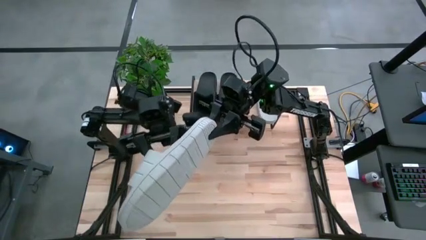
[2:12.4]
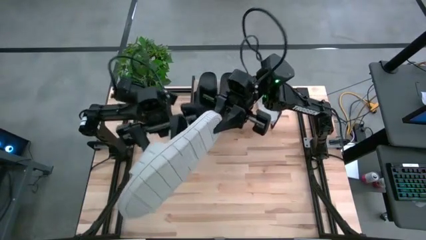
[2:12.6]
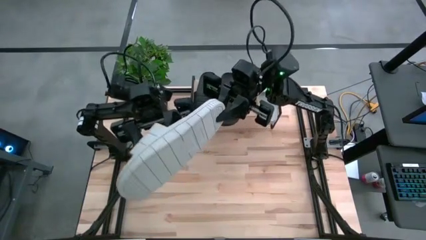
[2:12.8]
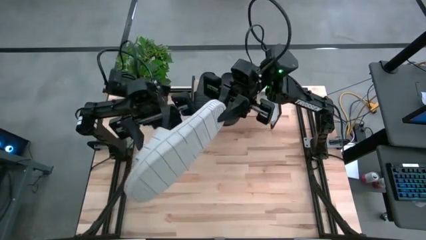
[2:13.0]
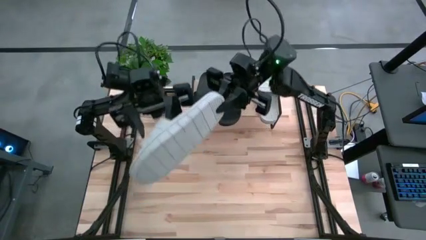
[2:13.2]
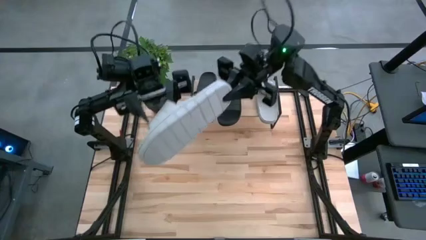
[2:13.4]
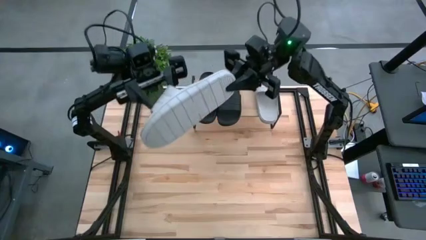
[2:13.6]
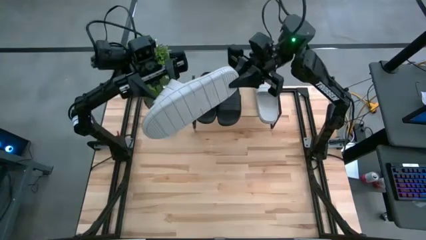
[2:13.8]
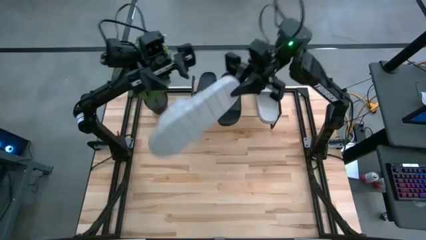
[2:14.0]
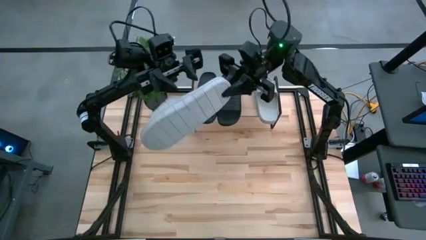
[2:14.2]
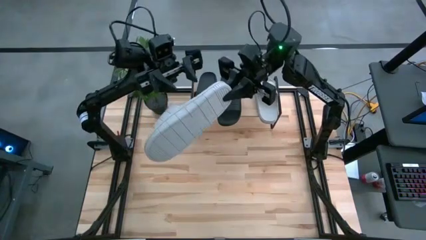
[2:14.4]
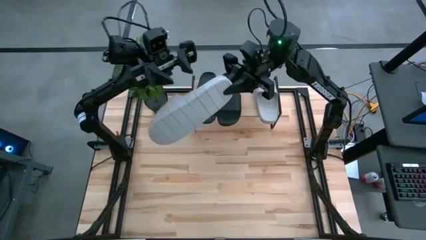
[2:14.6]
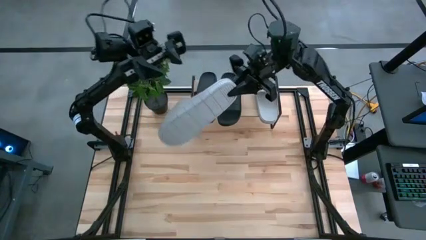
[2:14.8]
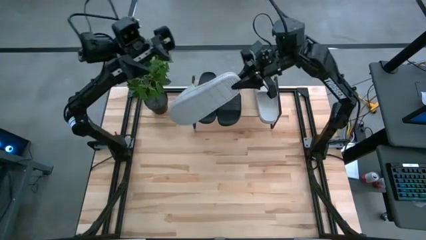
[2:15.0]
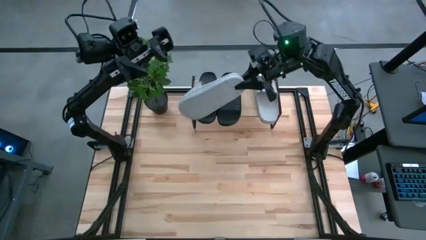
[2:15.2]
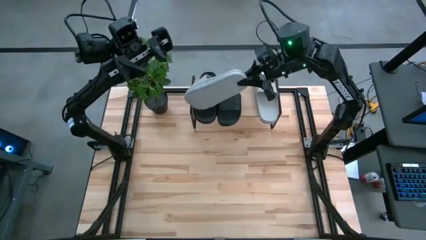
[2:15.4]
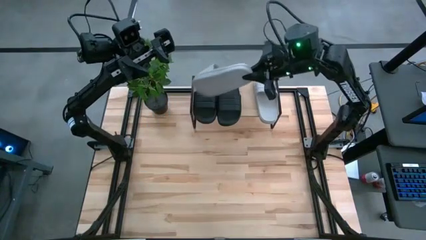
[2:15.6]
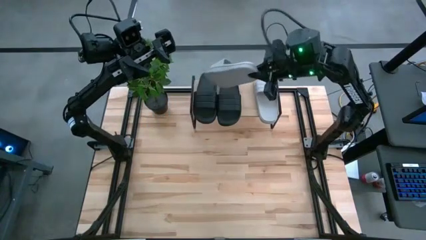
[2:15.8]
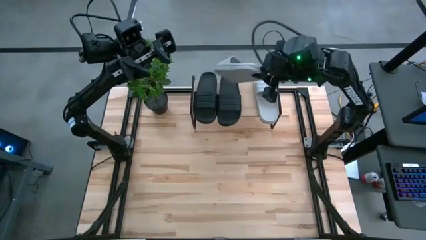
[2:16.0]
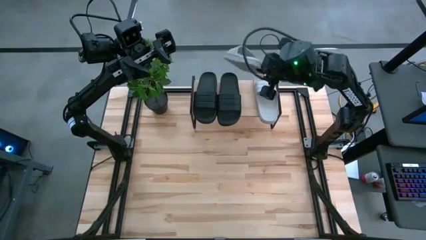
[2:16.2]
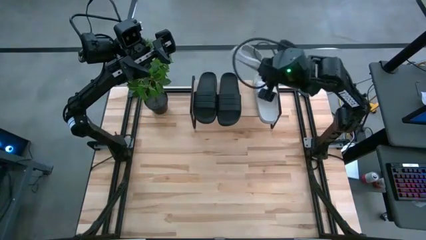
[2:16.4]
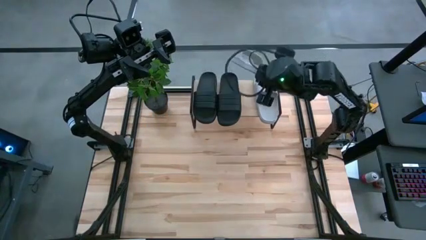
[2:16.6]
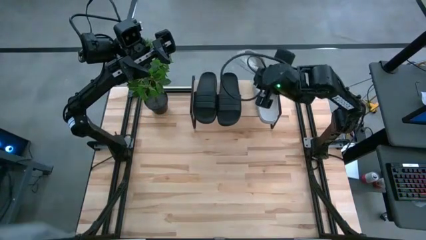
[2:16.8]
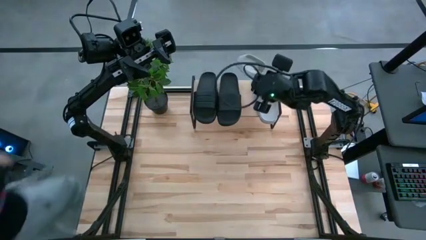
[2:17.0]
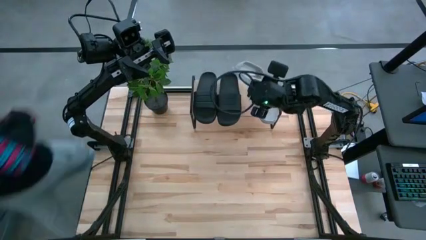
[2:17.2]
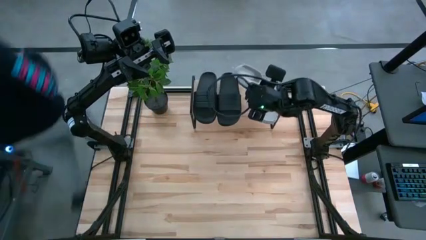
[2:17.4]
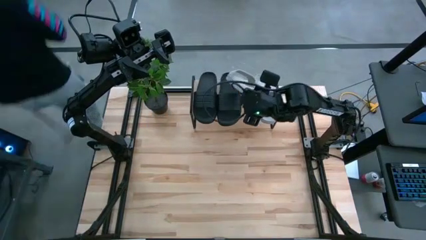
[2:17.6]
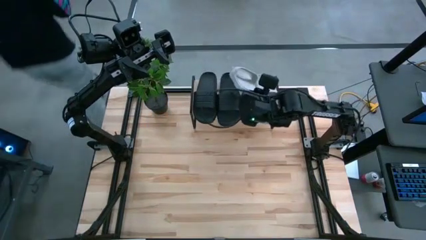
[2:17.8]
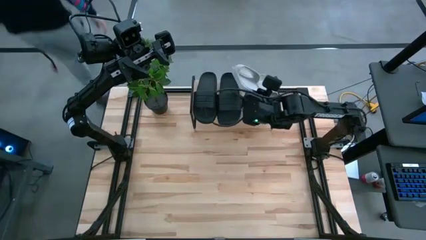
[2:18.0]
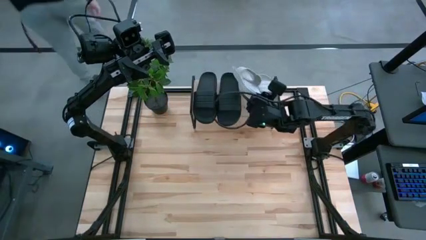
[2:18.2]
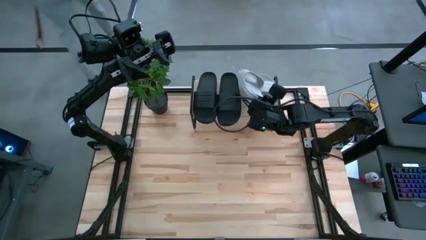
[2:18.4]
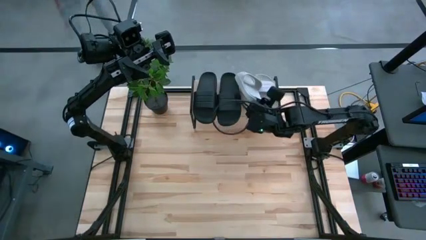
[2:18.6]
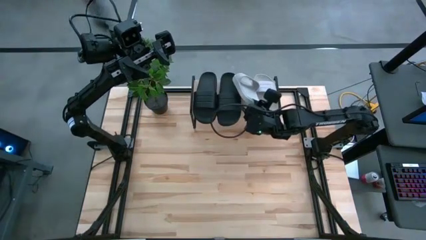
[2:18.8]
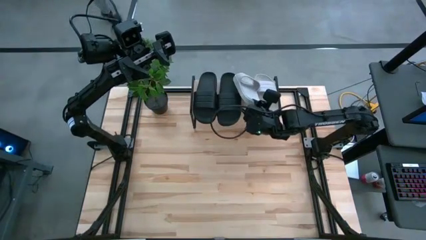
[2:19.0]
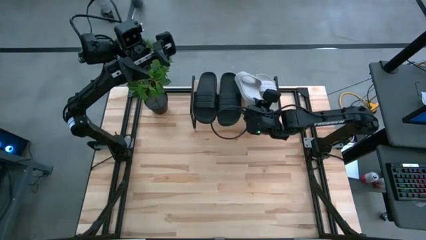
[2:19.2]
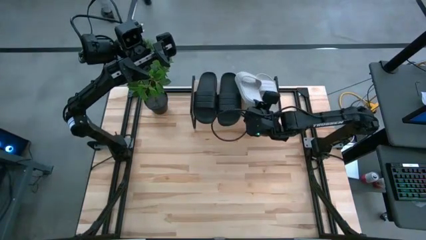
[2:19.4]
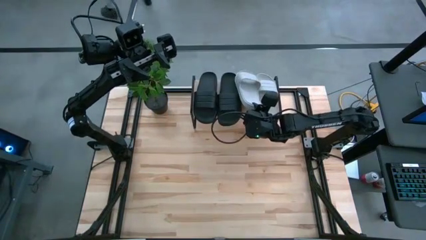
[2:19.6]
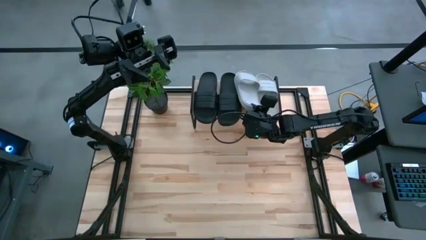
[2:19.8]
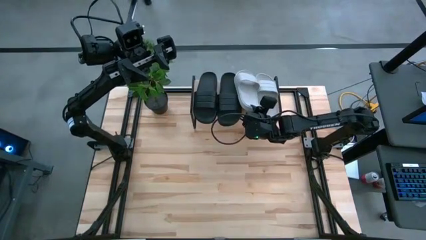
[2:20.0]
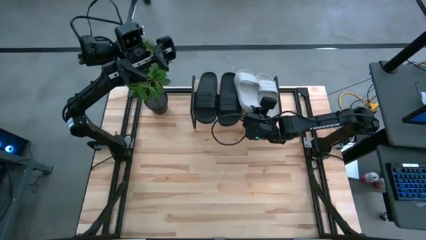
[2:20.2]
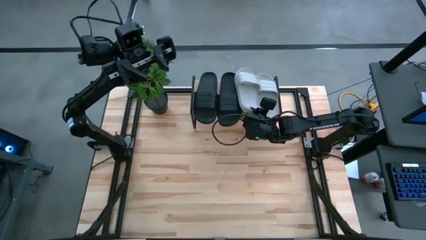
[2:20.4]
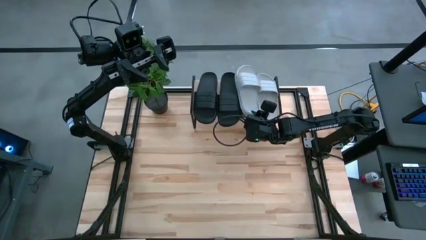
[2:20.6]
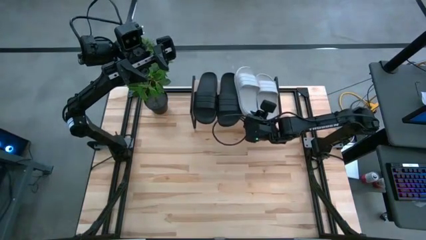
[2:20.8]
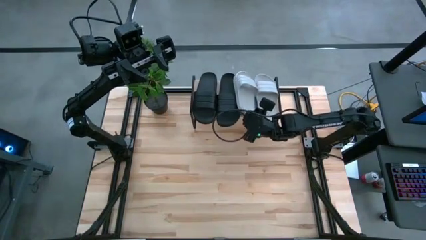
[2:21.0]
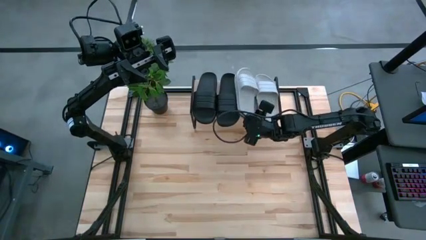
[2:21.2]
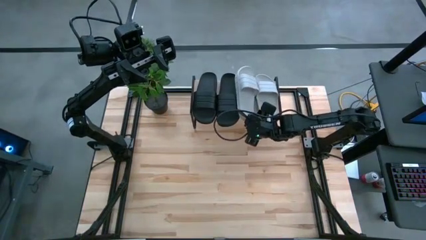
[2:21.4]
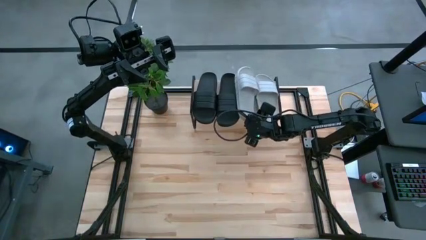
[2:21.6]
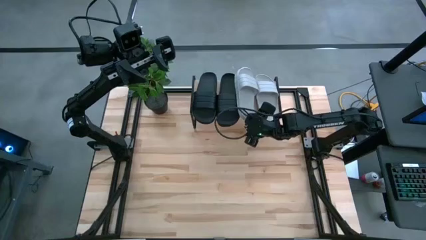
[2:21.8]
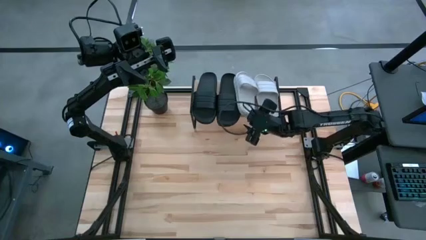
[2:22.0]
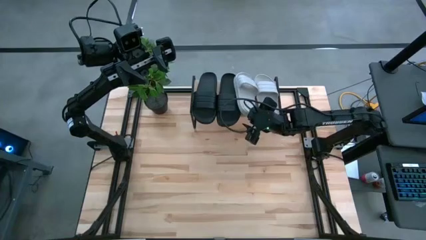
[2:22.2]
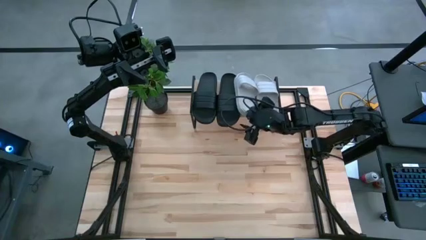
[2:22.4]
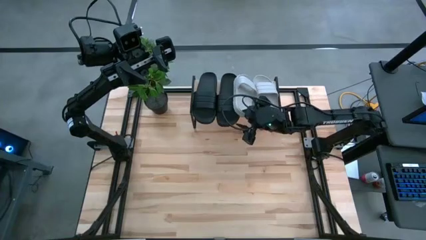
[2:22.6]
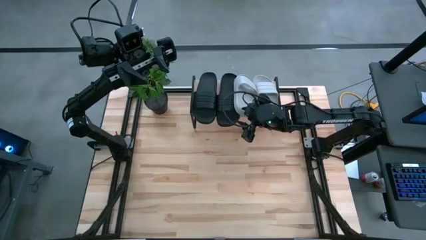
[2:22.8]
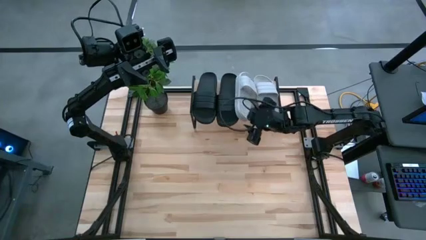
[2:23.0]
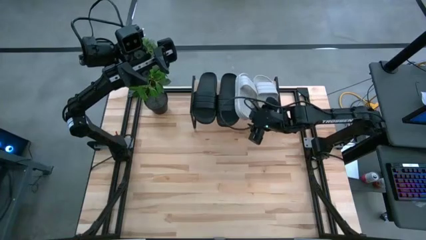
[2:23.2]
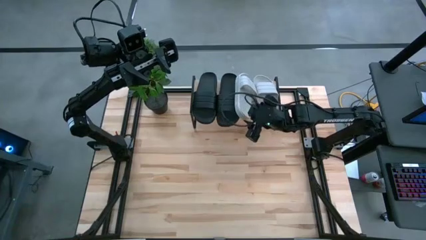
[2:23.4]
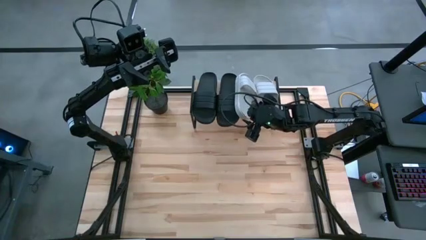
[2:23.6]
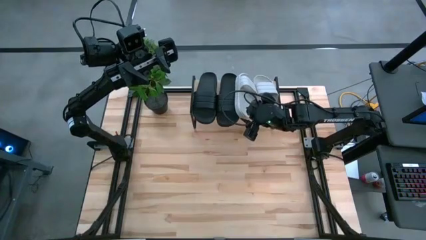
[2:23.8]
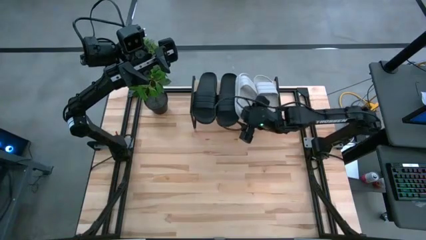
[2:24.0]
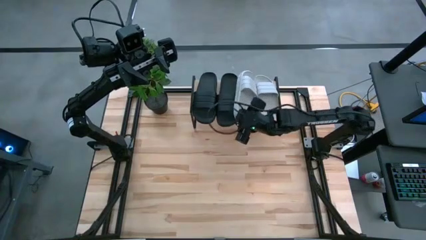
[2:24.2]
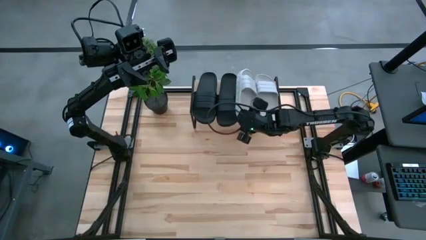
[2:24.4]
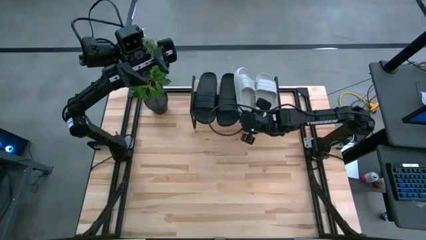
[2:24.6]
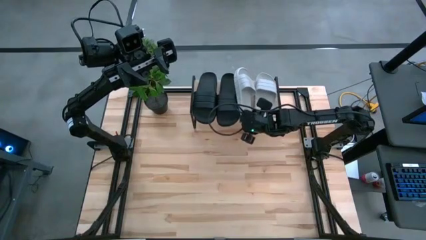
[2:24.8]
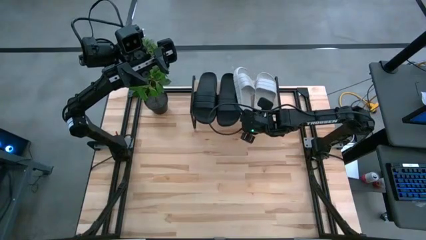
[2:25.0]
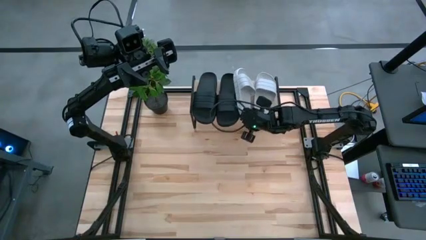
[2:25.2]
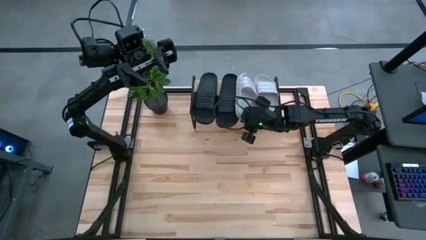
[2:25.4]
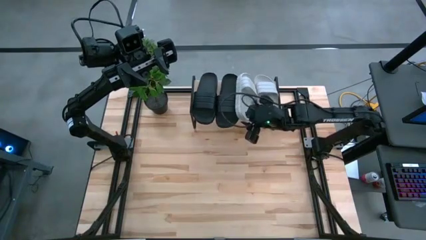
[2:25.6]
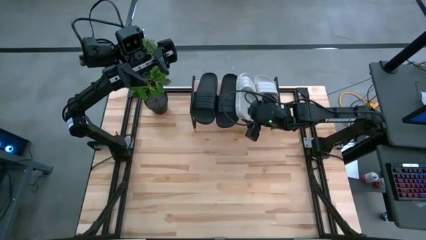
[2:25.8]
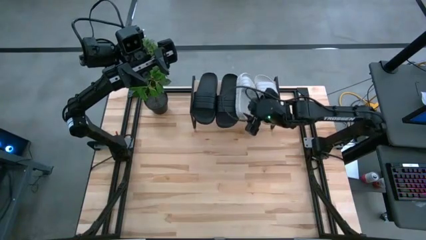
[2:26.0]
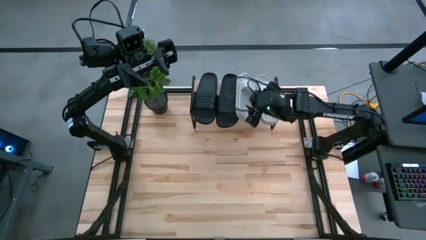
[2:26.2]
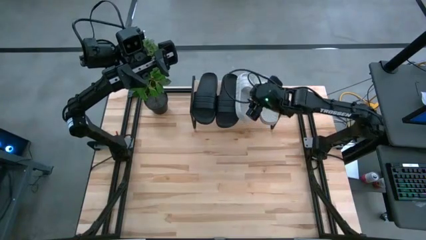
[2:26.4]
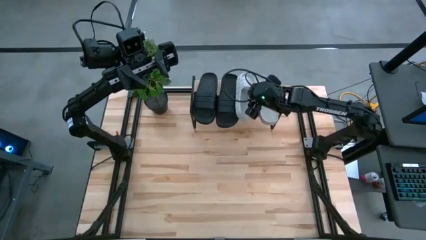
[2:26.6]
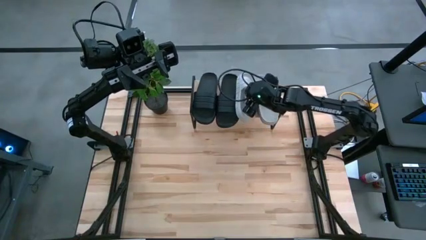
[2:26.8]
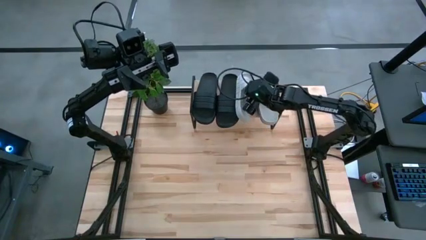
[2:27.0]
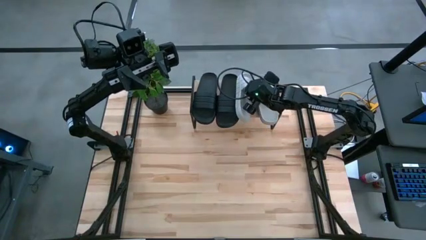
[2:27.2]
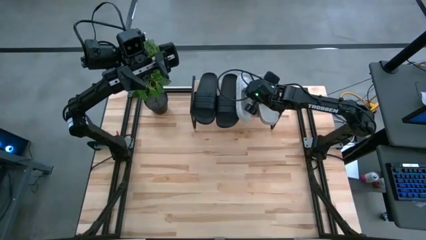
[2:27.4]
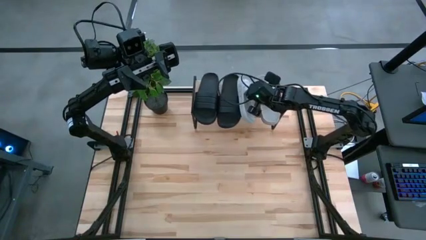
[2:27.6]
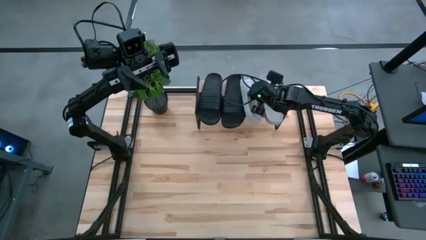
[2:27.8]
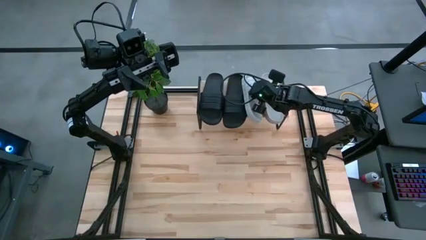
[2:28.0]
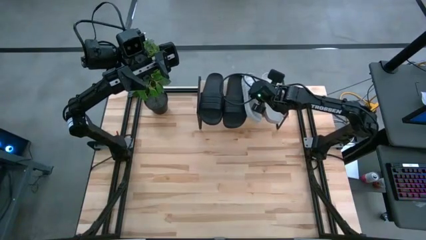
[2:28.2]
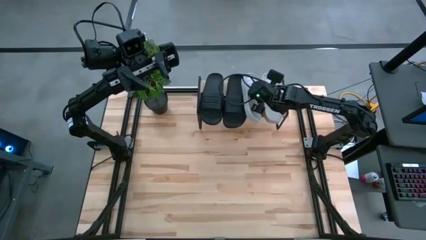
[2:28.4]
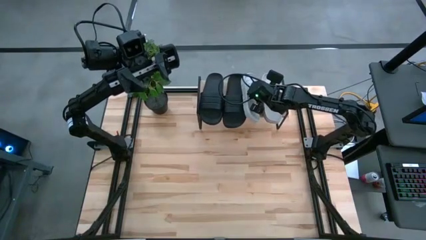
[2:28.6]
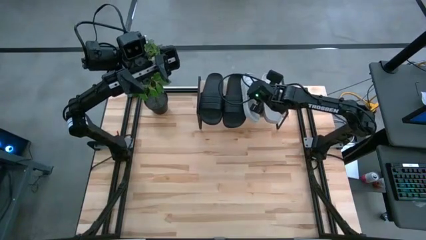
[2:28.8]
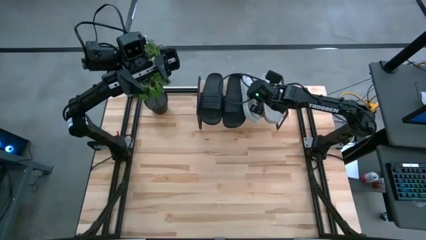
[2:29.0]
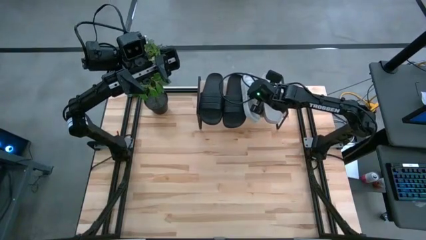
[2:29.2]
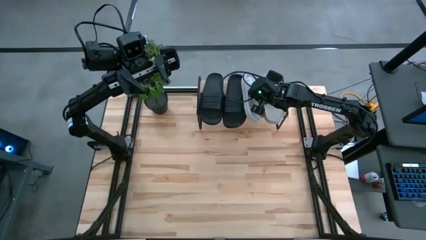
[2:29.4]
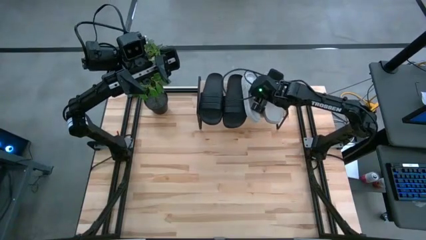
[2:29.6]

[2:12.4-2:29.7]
Task: Pick and place slides into the shelf
Put the gray slide on the shelf
